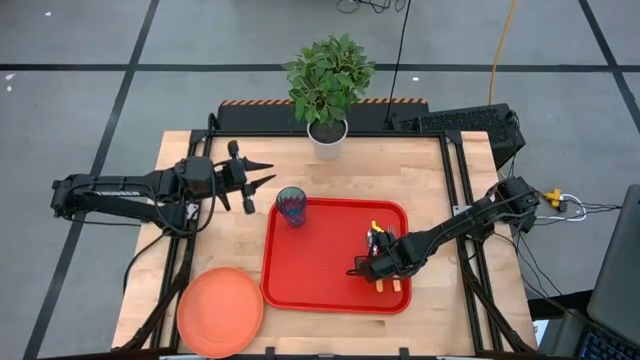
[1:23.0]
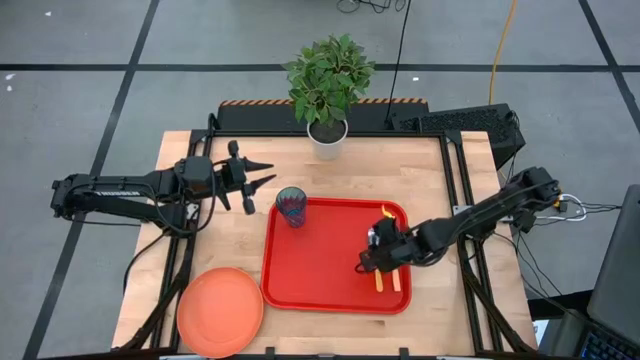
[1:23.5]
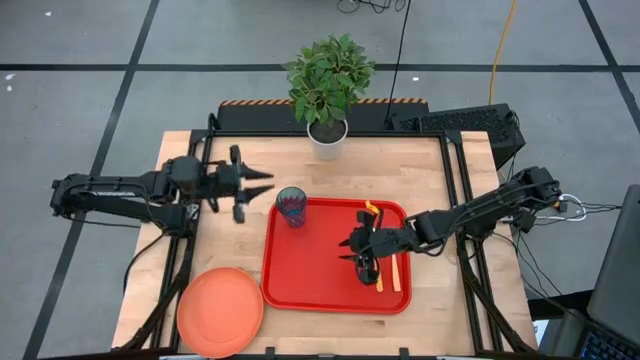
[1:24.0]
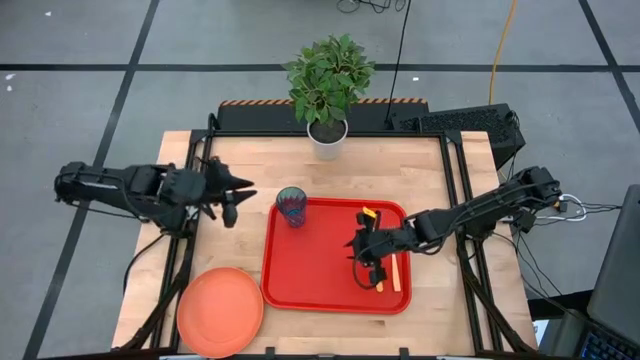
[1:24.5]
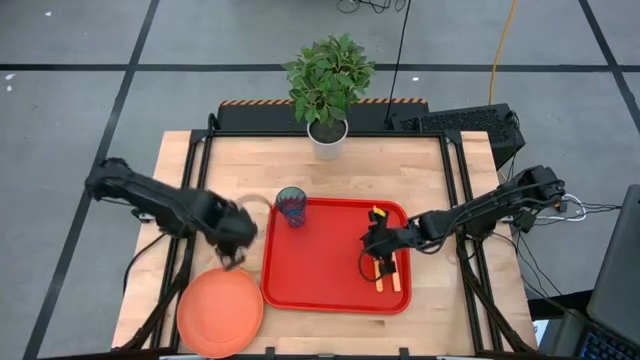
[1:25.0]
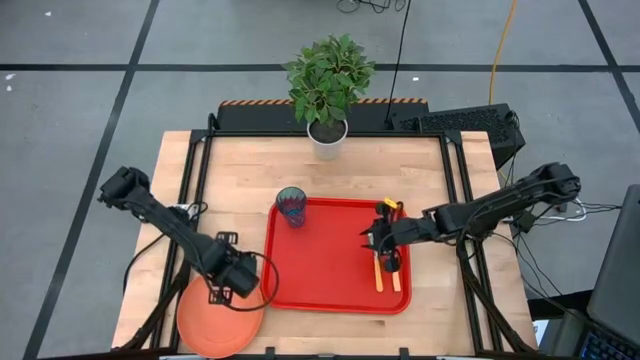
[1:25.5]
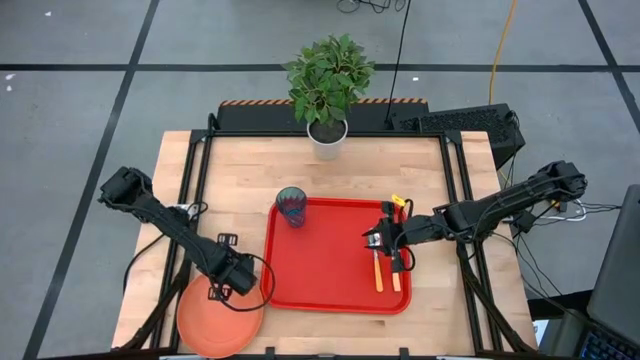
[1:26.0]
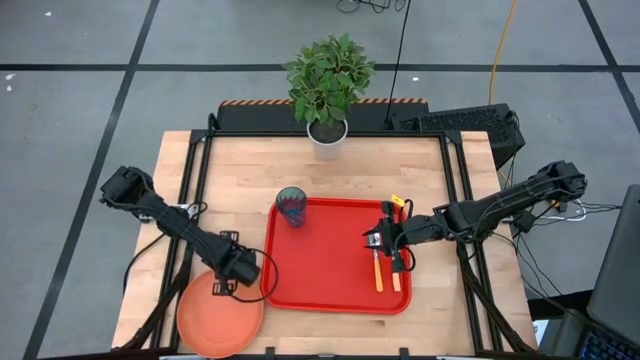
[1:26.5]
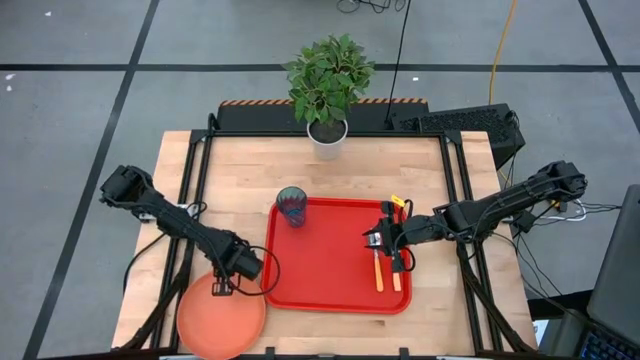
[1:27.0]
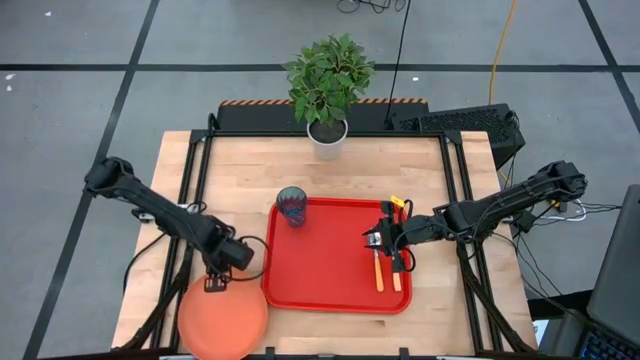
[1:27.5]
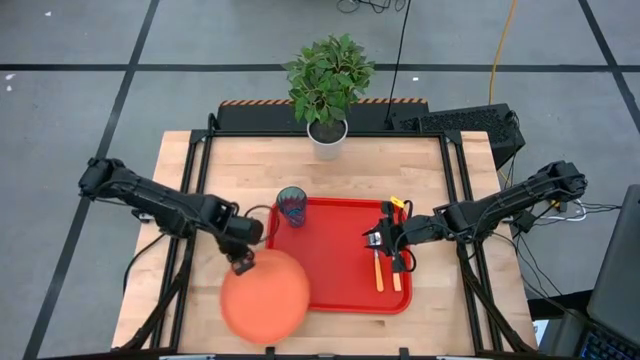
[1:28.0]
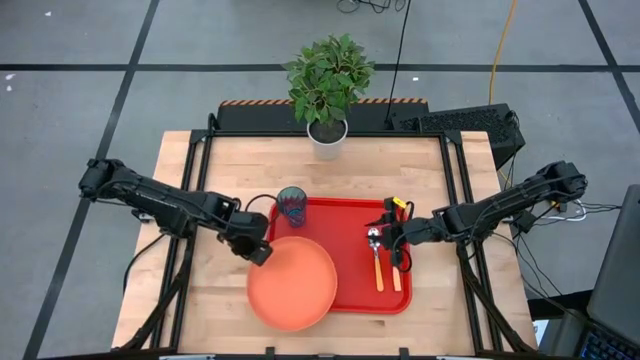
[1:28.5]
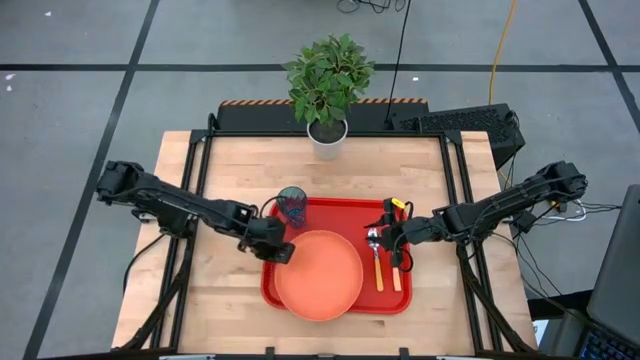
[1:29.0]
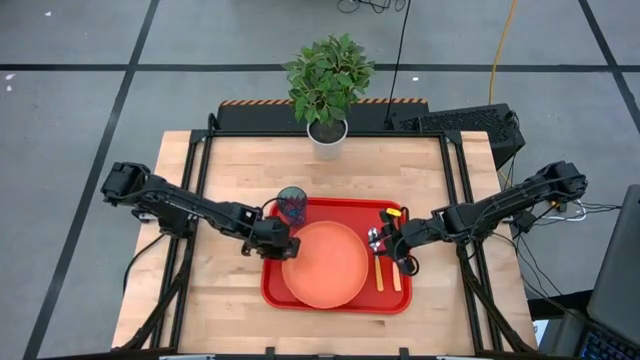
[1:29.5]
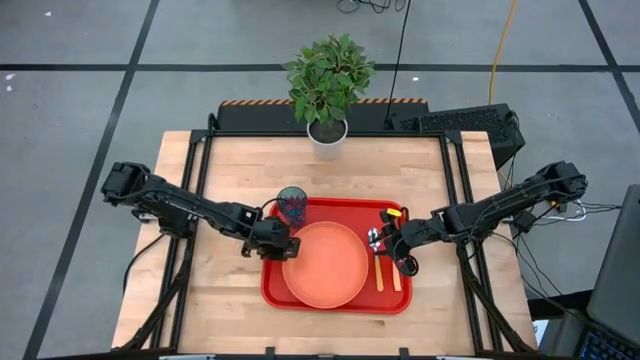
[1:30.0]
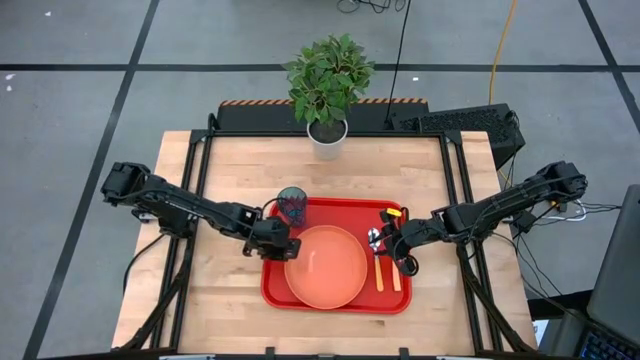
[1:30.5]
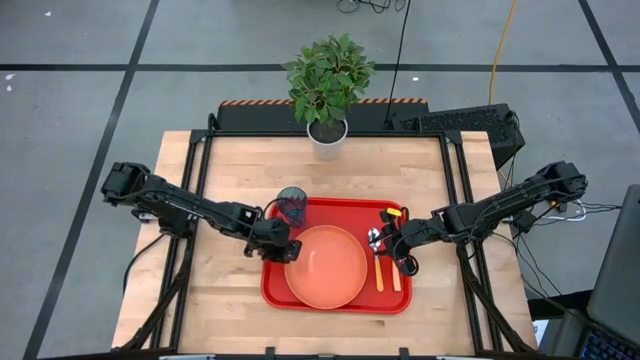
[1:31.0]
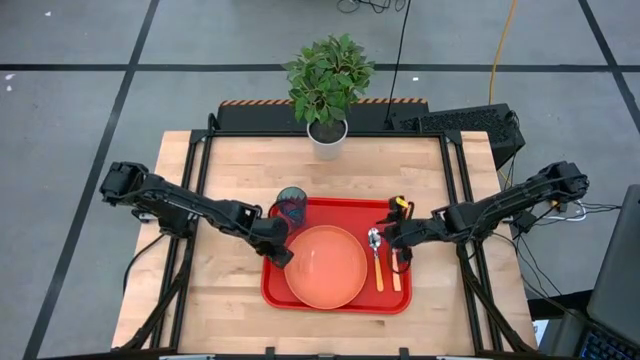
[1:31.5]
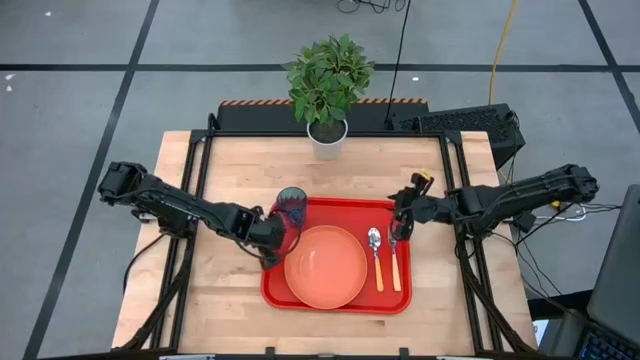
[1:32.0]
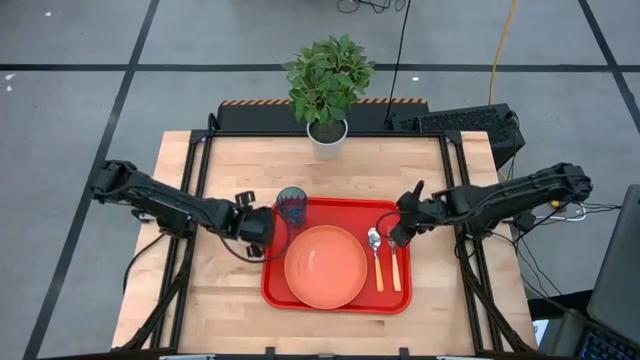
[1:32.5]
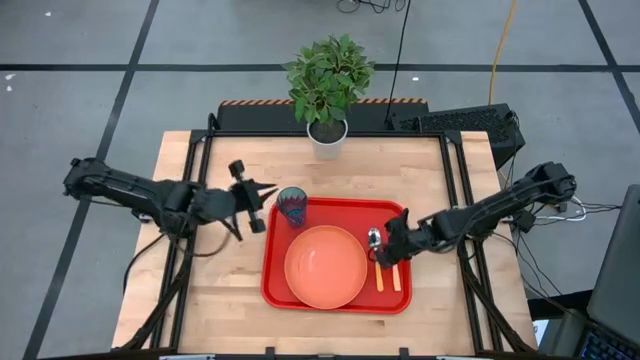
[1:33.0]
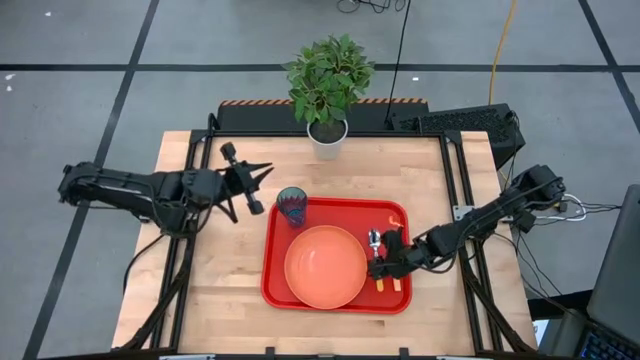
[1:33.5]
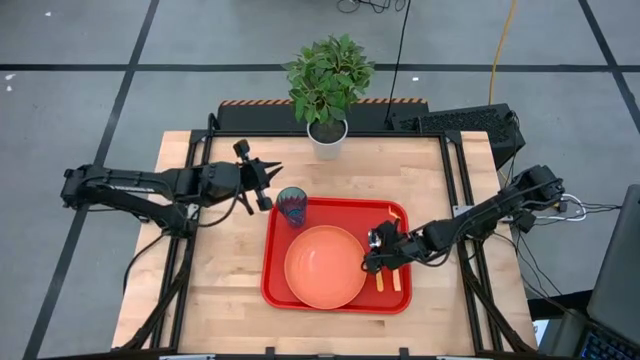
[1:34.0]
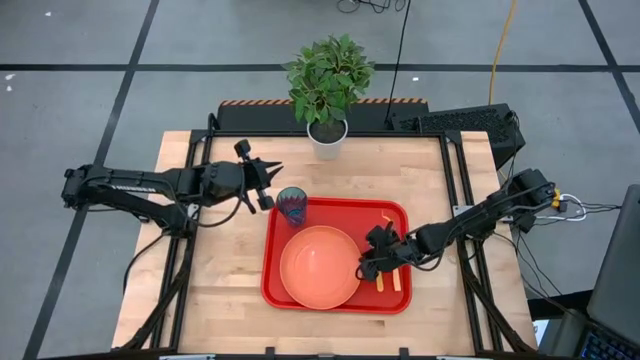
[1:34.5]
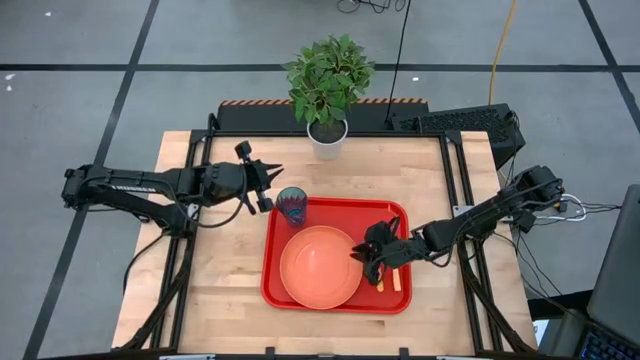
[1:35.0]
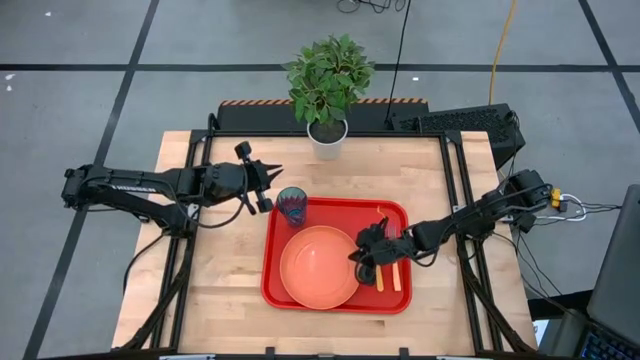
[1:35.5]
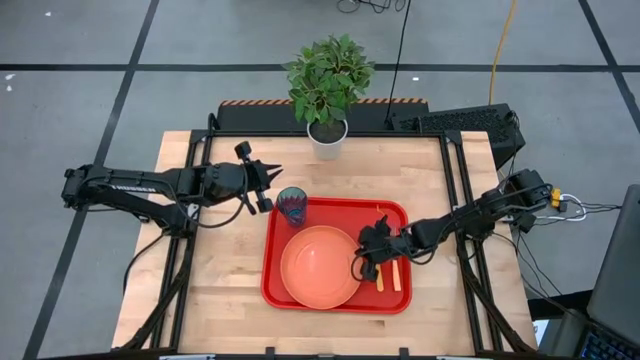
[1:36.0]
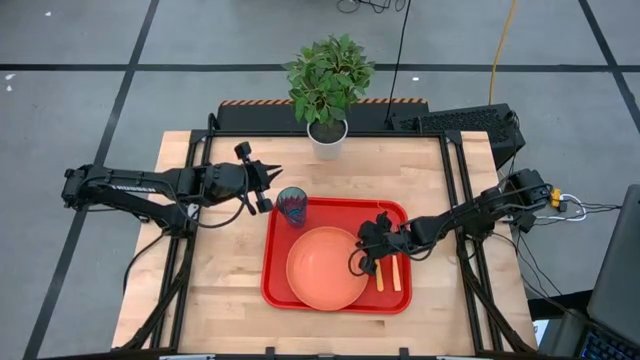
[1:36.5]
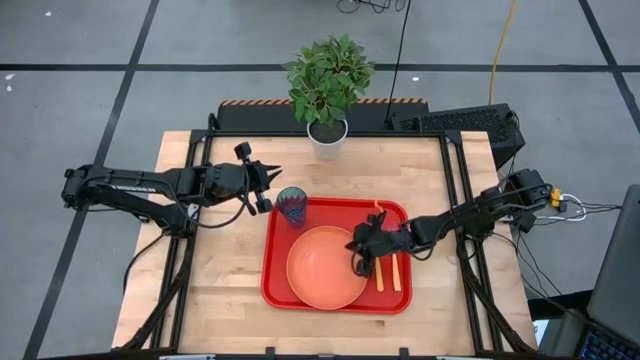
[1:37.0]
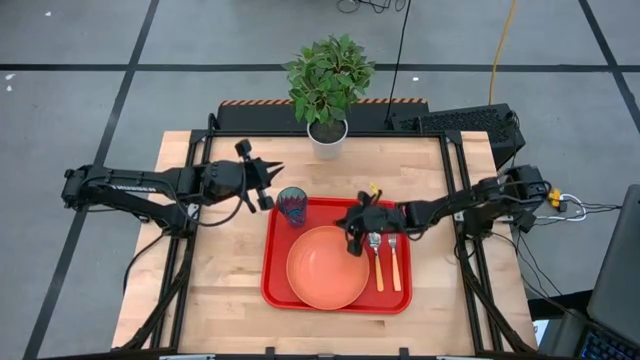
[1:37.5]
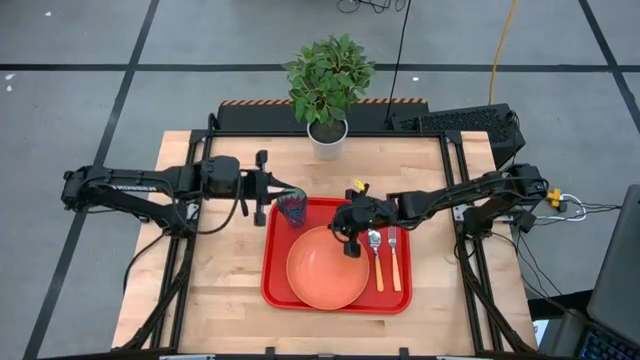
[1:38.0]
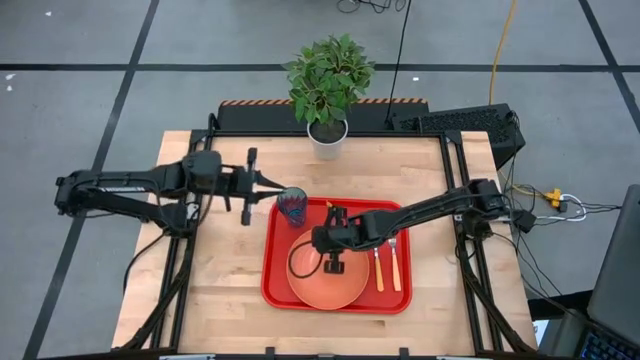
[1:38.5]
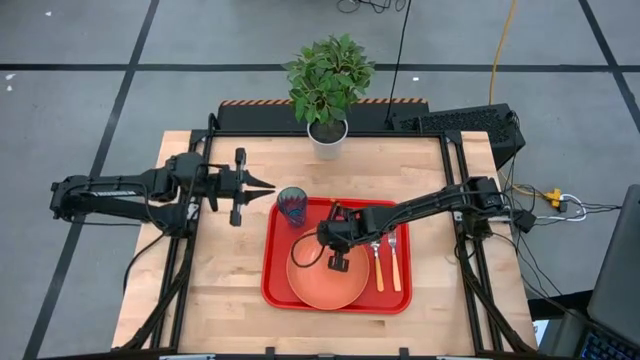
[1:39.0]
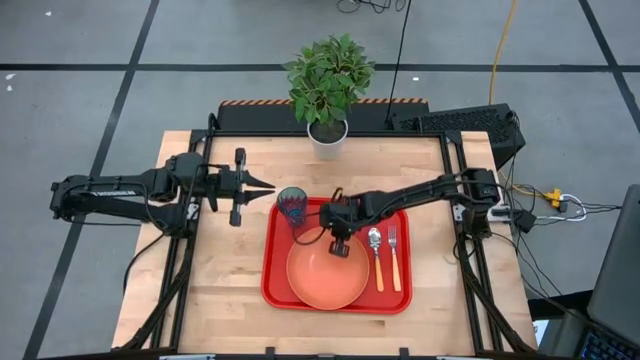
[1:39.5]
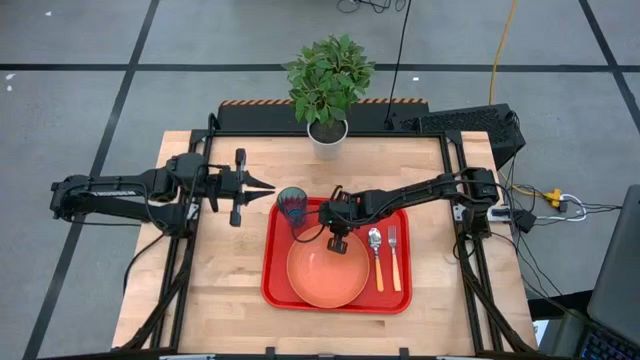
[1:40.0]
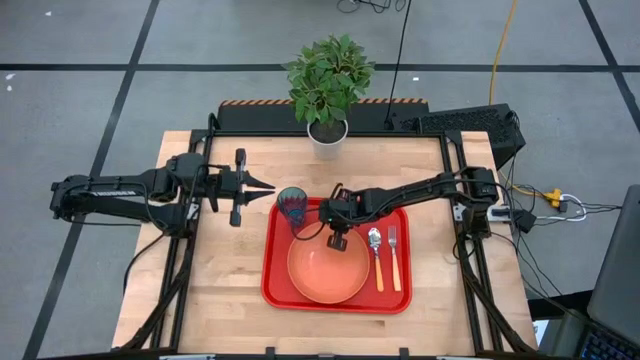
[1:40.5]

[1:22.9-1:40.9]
Task: Pick and place plate/cup/fork/spoon on tray
Put the orange plate on the red tray

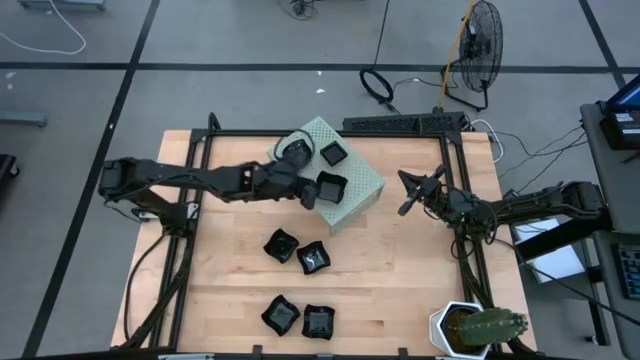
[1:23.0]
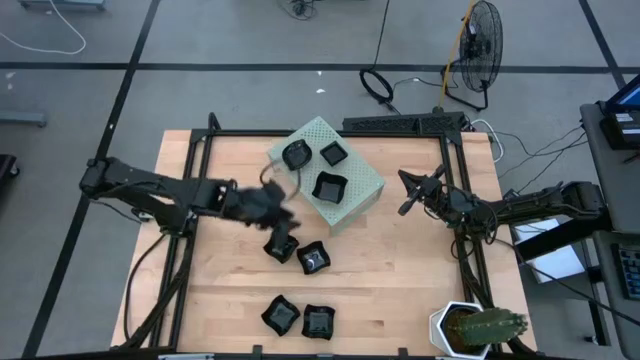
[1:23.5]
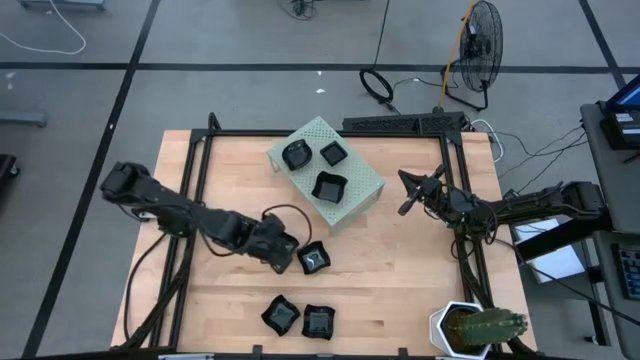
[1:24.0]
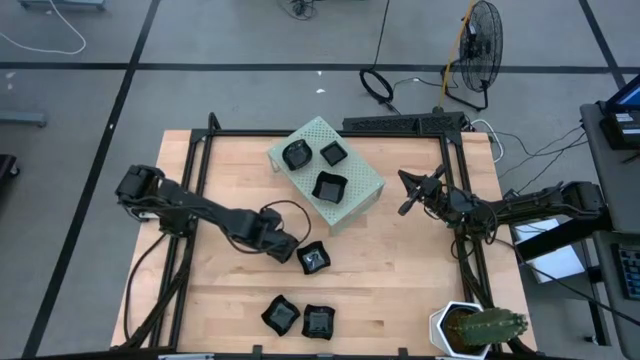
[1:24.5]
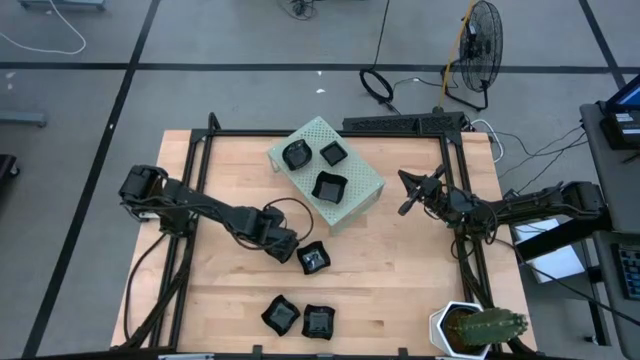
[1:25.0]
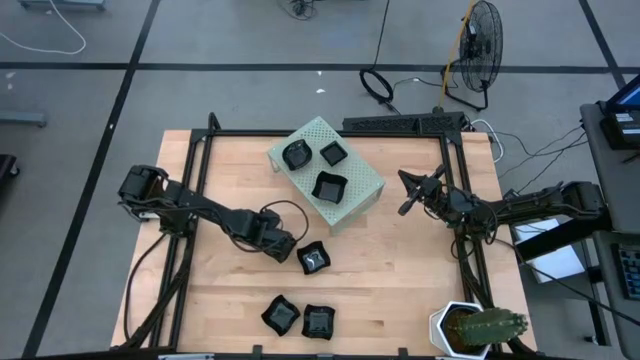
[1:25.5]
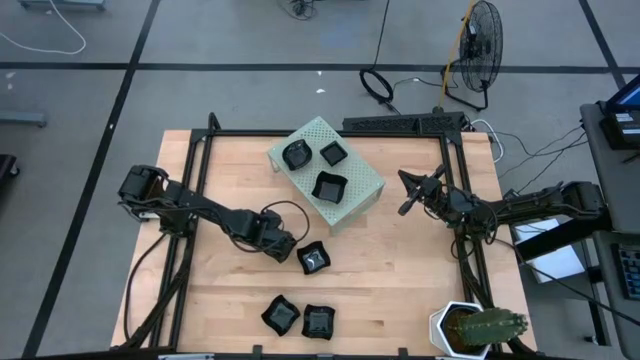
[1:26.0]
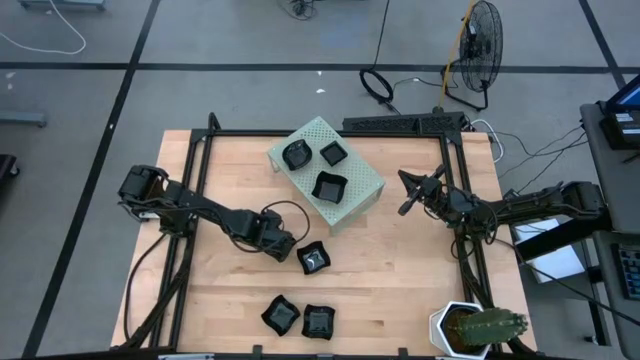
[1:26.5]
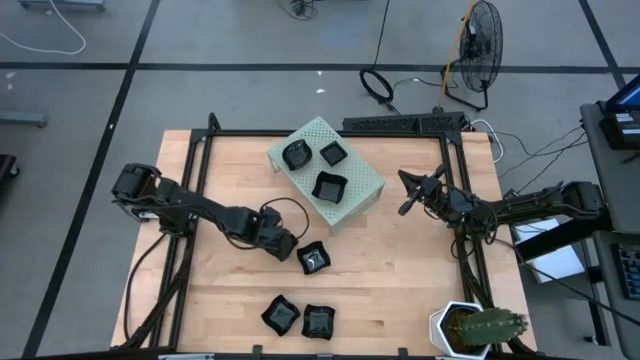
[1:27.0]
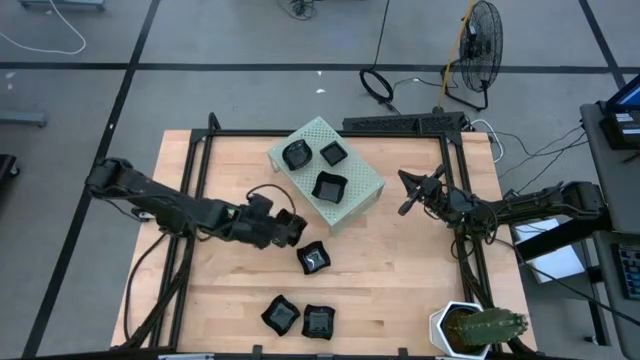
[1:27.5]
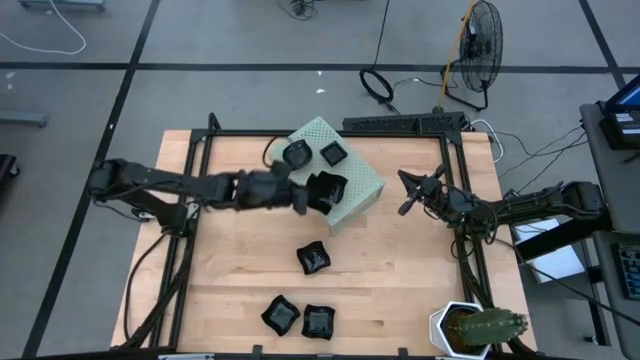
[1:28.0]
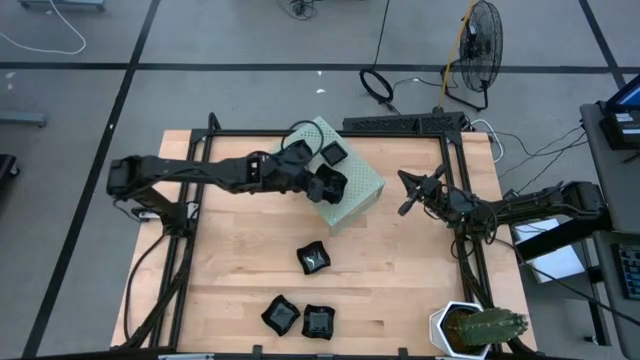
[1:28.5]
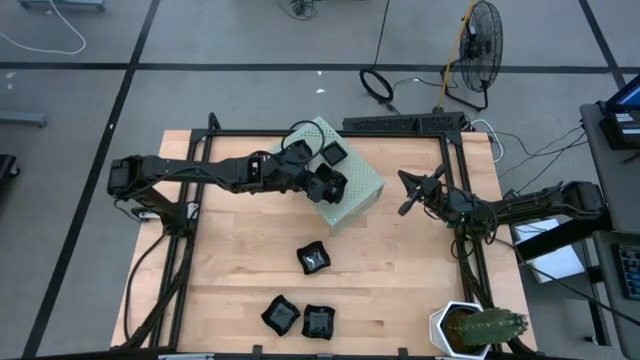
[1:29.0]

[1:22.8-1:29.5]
Task: Pick & Place Mini shaped plates
Stack the distorted square plate on top of the other distorted square plate on the shelf
